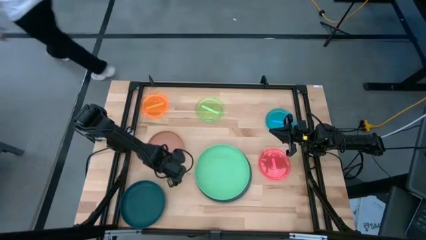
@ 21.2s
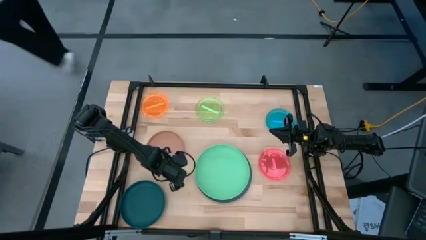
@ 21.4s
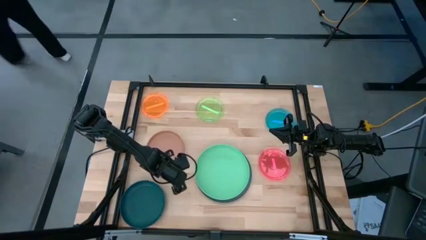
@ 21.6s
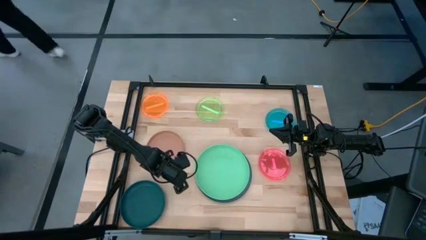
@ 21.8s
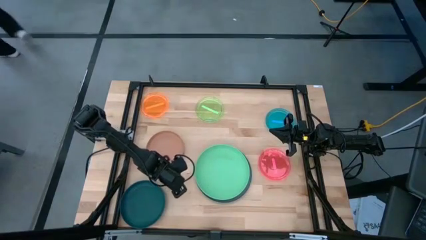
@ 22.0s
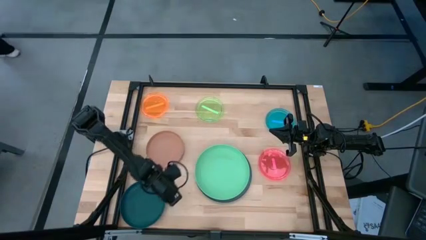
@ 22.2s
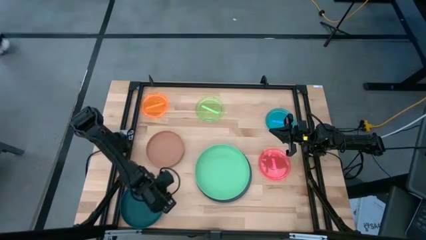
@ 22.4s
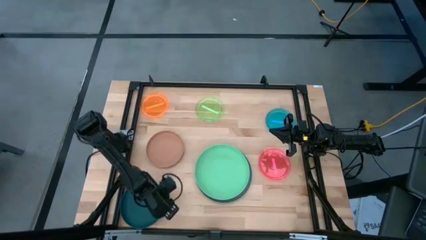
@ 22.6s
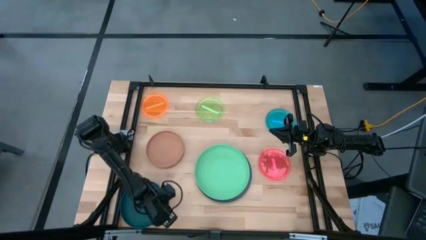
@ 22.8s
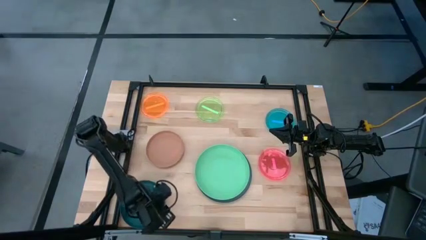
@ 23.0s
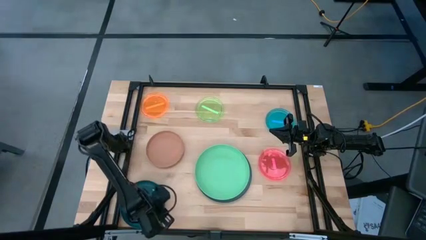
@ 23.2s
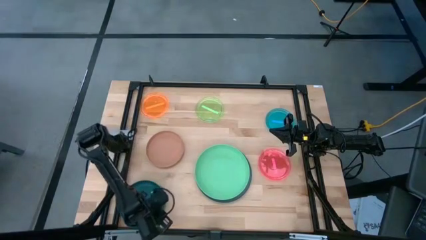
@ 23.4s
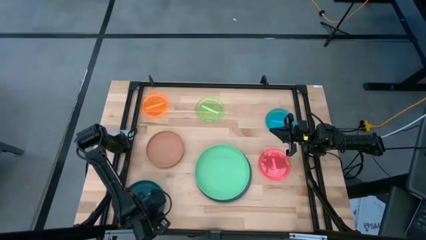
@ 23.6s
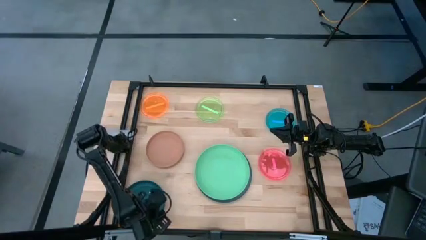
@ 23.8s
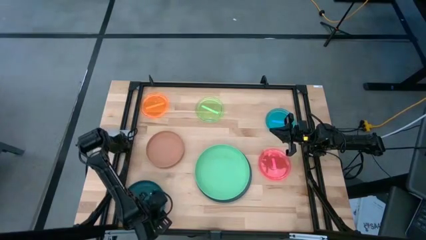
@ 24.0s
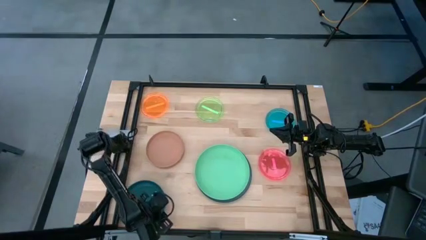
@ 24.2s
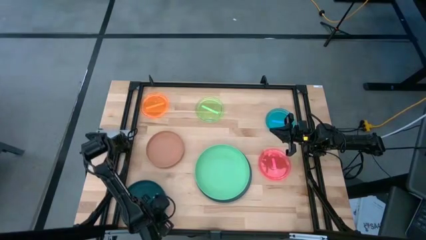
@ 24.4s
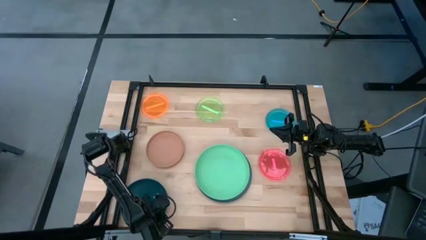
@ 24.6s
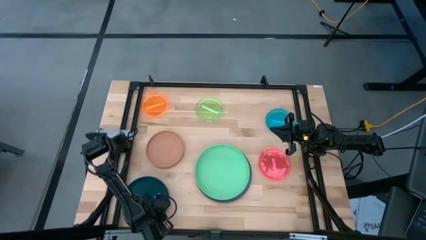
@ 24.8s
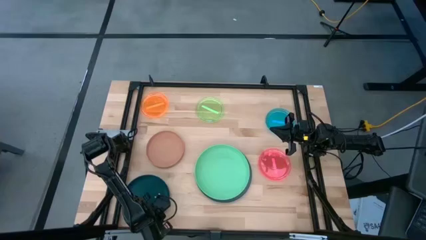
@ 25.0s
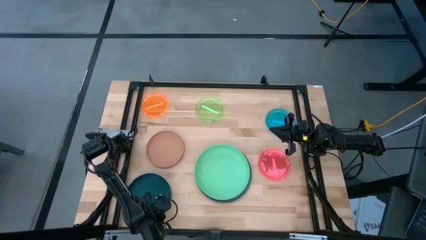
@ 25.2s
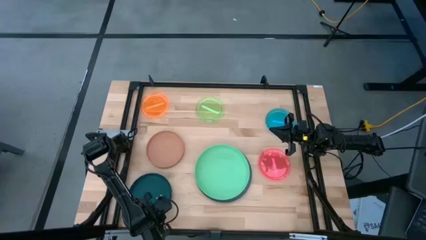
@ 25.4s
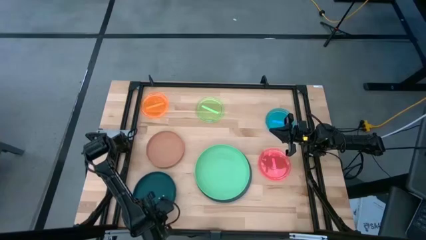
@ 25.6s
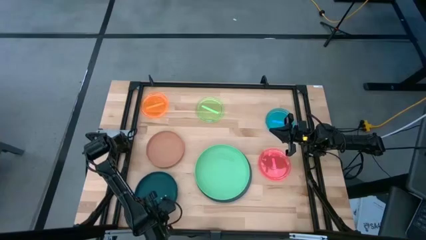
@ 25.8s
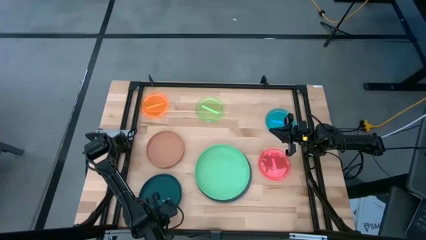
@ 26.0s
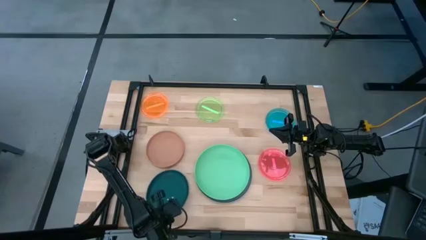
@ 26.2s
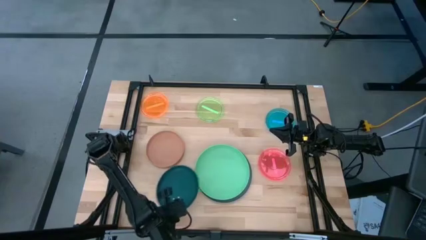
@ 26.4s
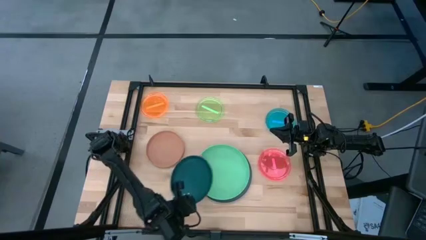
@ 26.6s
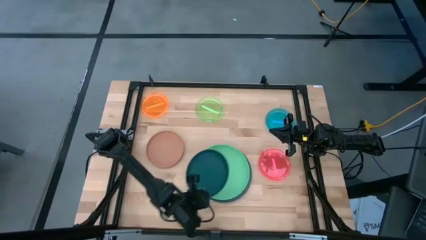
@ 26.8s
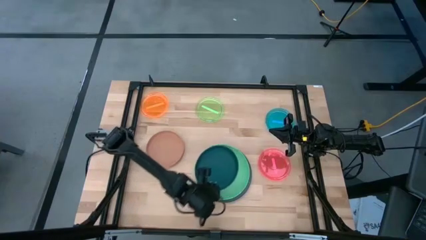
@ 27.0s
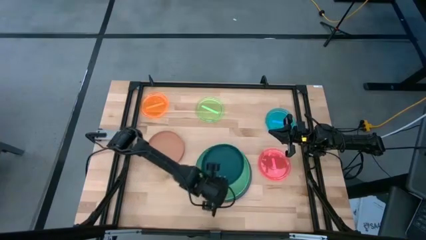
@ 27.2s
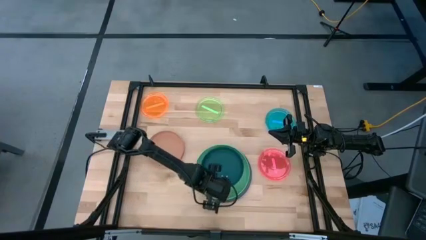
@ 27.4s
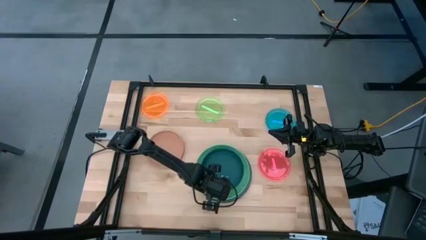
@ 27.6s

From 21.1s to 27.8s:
Task: Stack plastic plates
Stack the dark blue plate on top of the light green plate

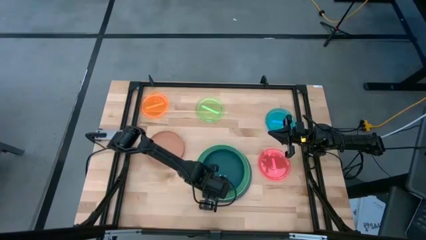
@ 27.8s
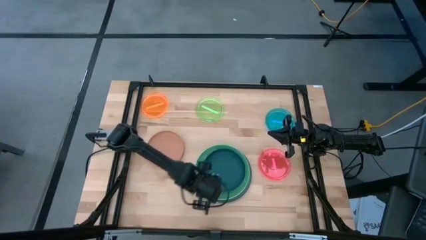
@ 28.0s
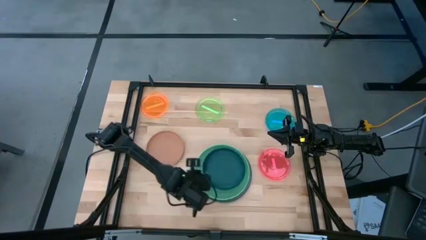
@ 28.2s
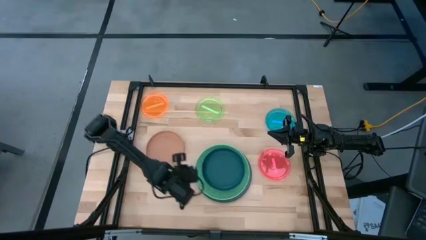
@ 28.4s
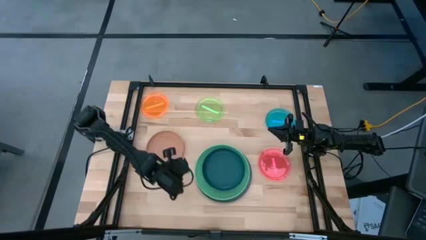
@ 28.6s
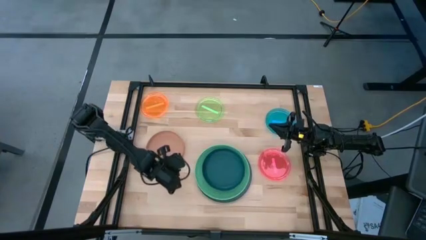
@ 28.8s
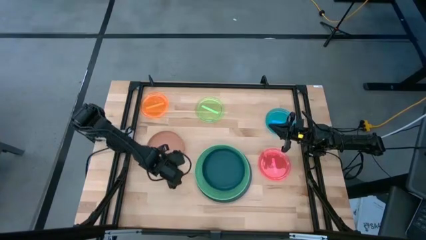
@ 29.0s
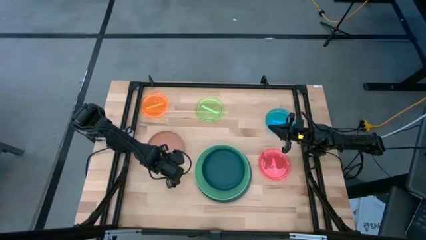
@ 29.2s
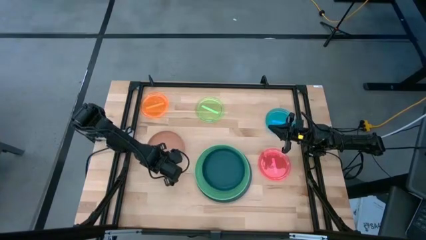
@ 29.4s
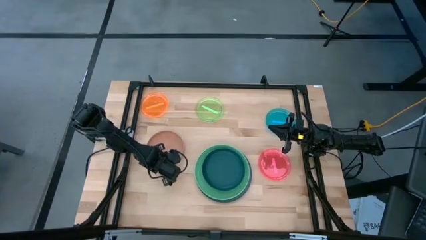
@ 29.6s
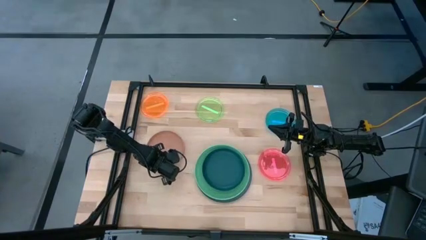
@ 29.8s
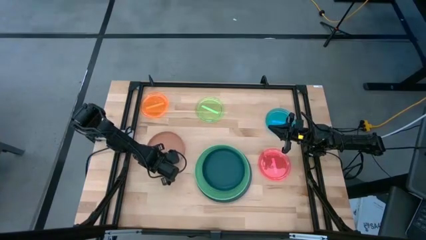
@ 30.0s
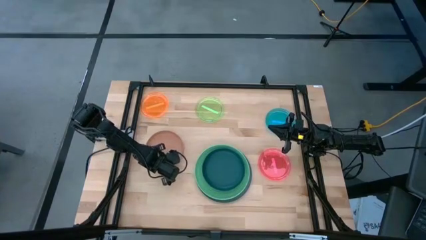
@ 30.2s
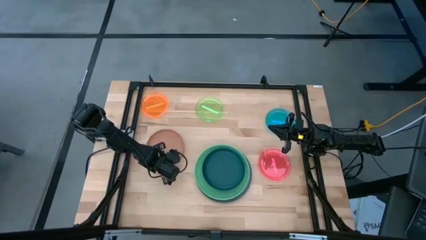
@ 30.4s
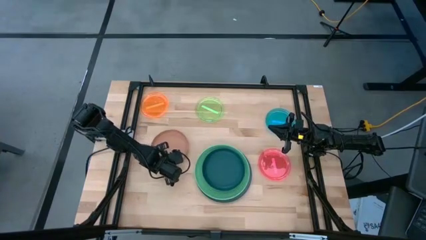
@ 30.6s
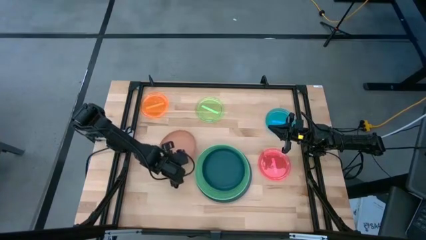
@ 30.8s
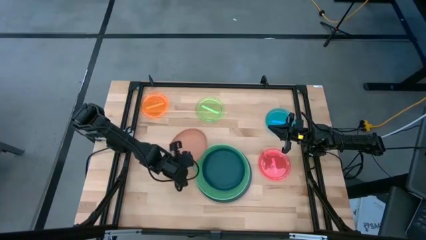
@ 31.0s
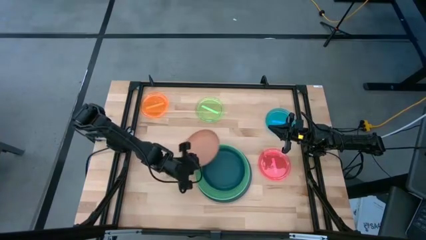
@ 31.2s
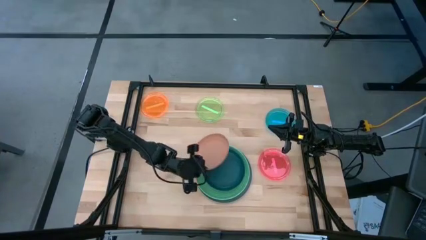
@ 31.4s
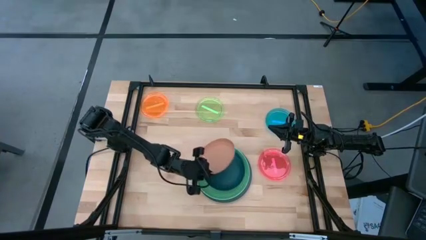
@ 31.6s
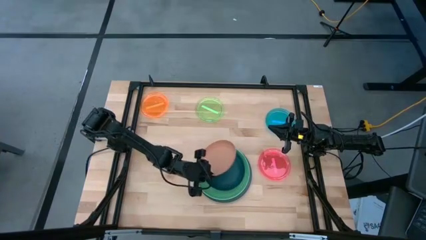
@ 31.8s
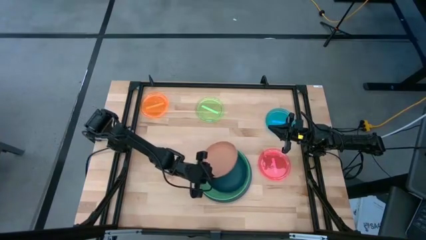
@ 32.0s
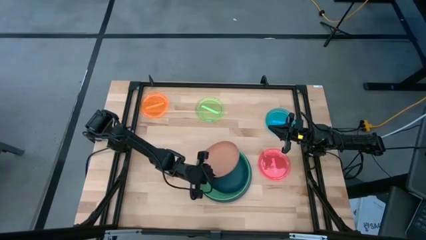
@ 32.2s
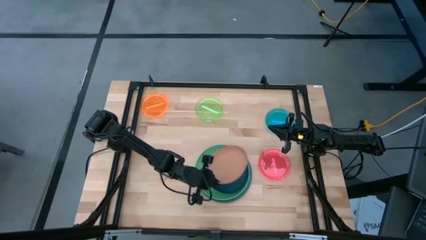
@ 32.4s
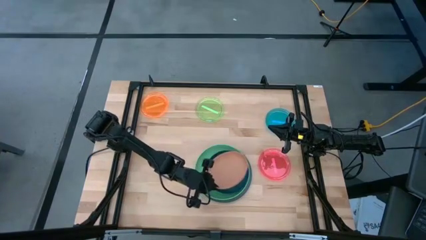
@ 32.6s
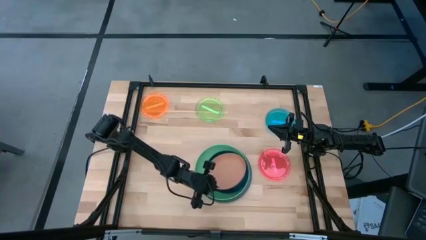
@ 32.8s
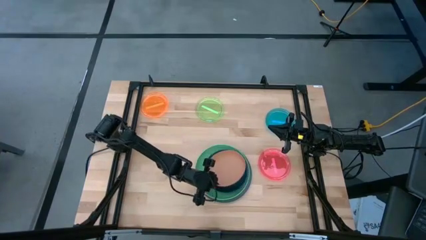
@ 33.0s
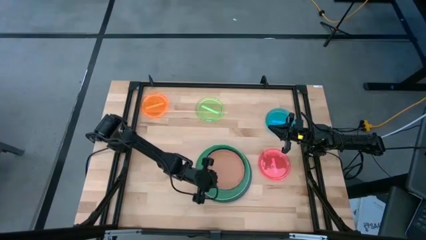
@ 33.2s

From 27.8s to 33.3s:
Stack the brown plate on top of the dark blue plate

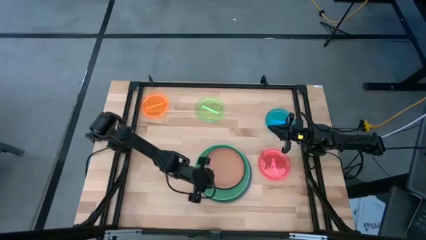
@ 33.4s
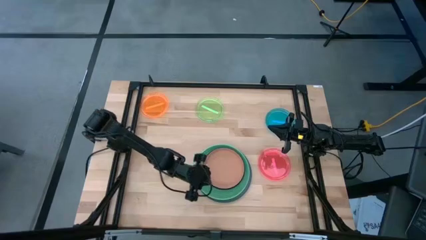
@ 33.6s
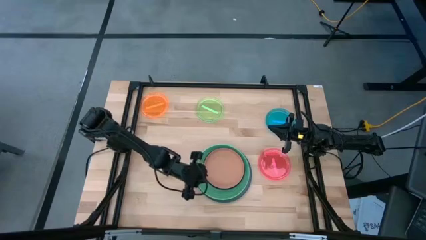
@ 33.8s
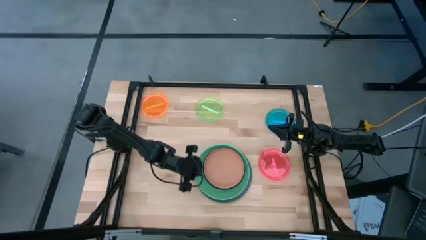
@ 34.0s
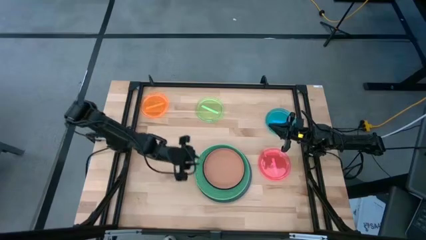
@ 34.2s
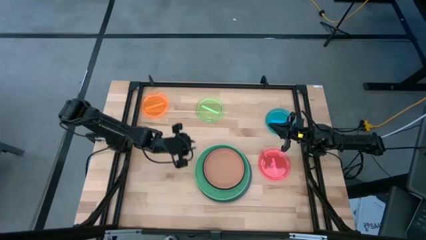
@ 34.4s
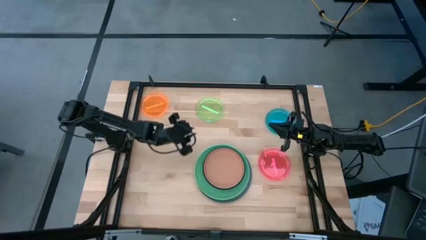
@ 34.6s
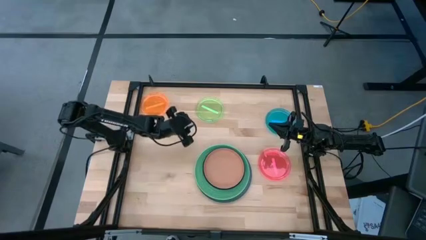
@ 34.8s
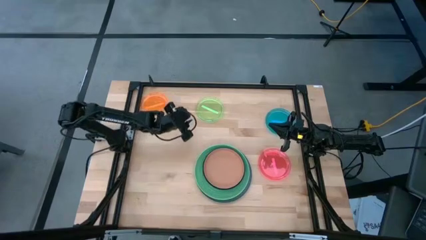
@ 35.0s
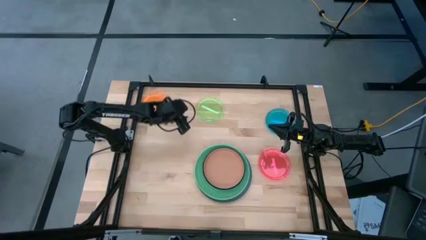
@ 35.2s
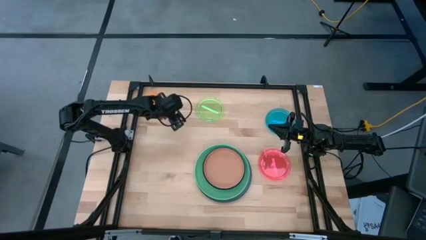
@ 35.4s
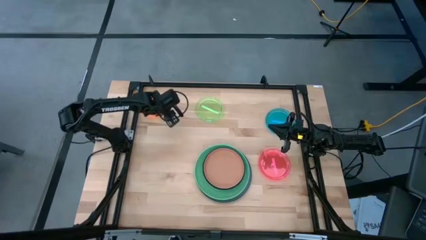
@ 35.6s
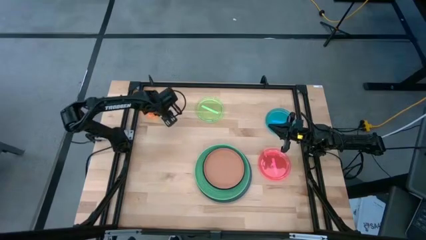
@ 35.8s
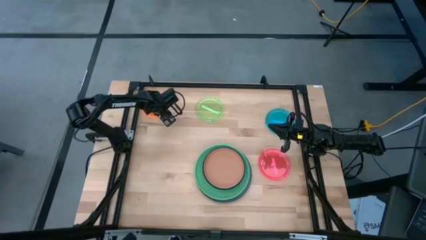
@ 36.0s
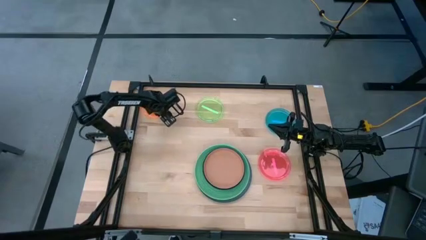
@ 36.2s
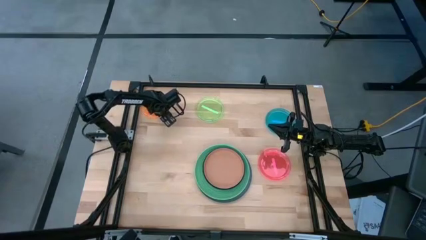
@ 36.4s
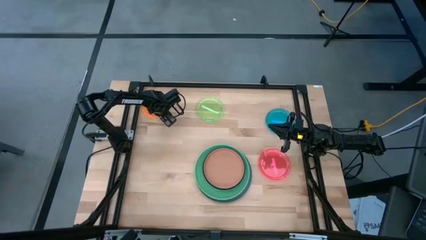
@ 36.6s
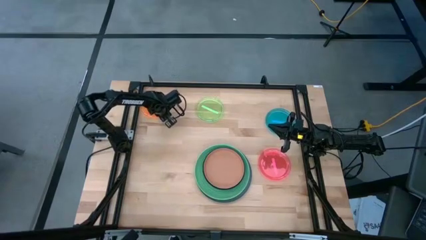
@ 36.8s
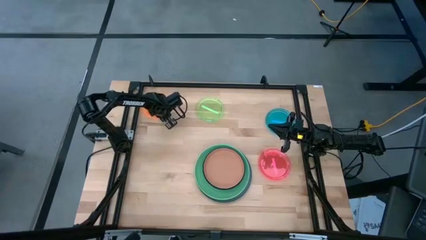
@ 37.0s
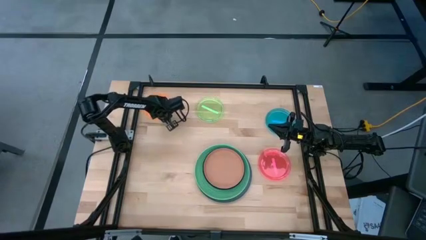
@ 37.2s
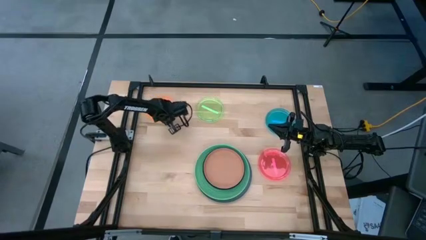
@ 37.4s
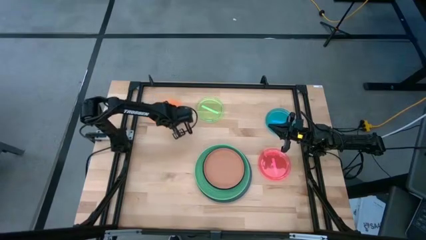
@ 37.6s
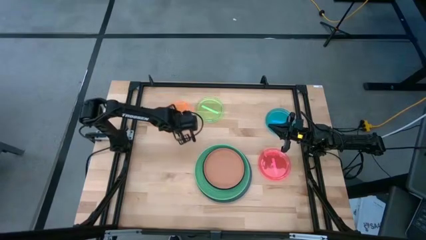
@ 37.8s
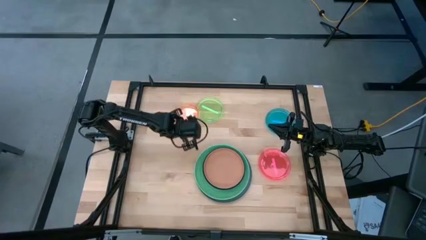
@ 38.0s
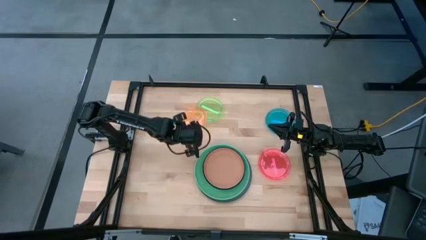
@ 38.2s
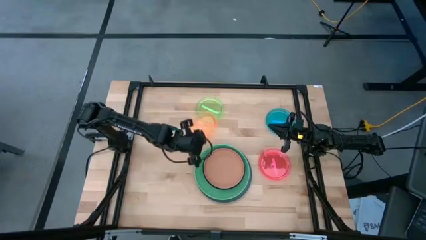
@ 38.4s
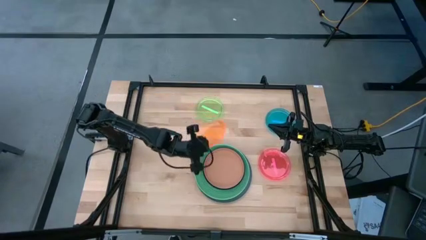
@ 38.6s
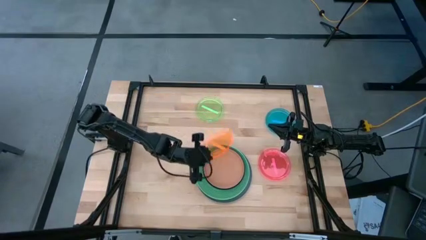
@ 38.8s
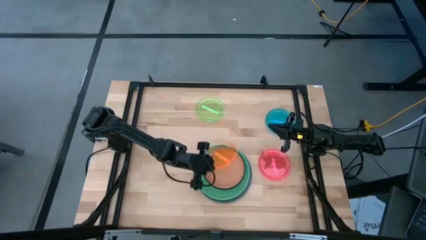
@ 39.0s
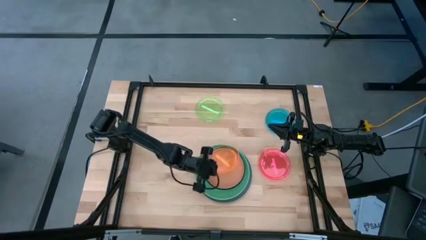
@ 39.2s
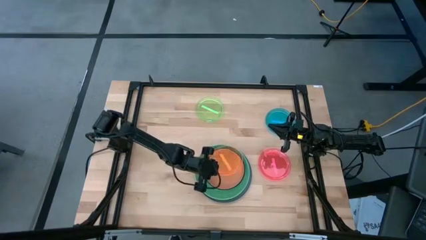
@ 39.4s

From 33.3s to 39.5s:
Stack the orange plate on top of the brown plate
